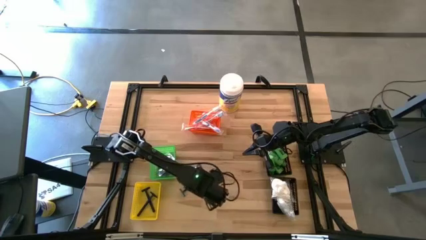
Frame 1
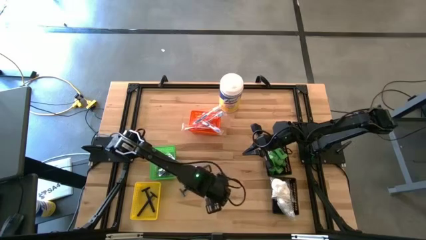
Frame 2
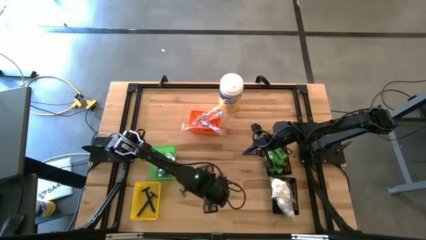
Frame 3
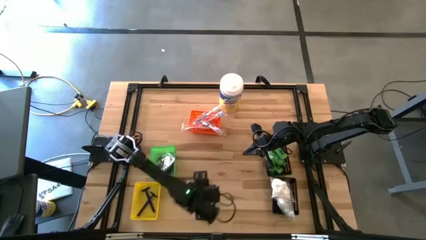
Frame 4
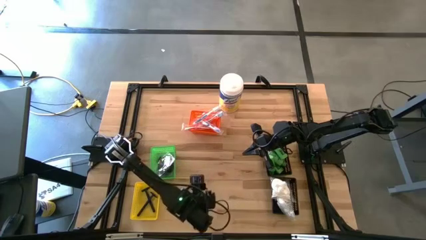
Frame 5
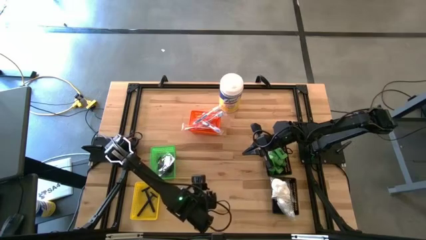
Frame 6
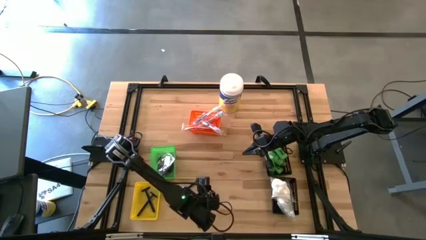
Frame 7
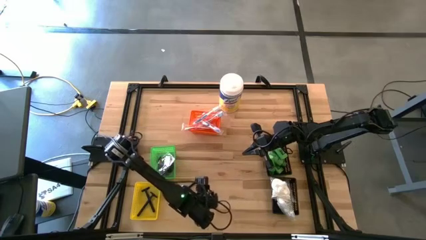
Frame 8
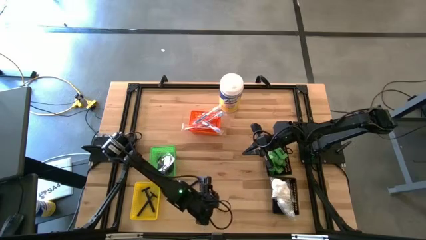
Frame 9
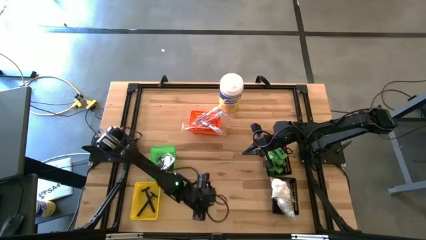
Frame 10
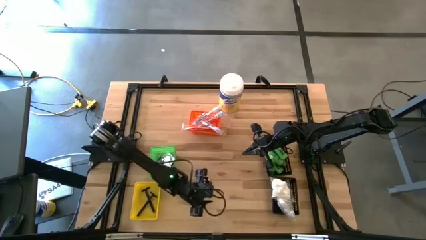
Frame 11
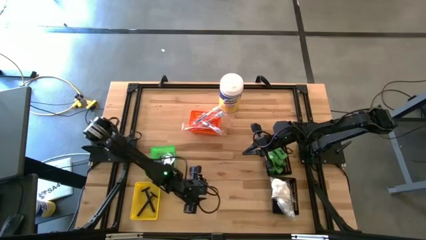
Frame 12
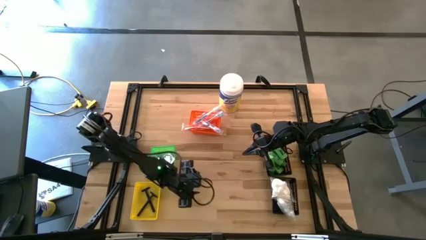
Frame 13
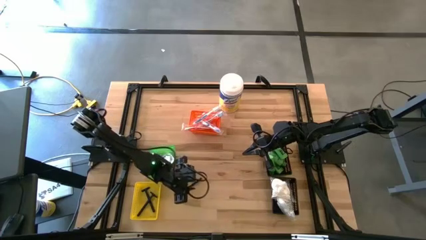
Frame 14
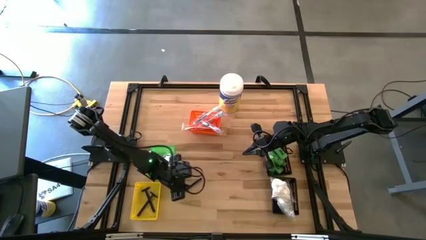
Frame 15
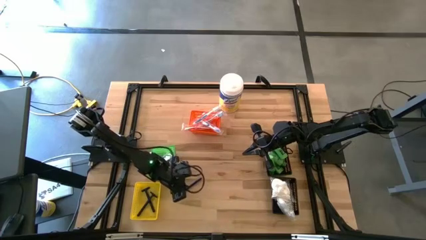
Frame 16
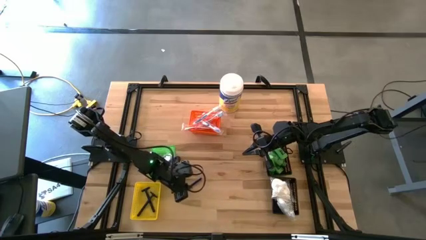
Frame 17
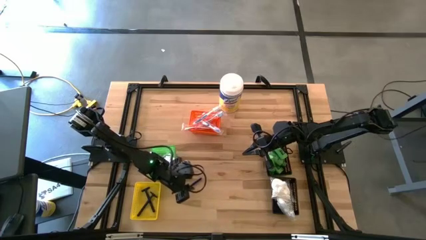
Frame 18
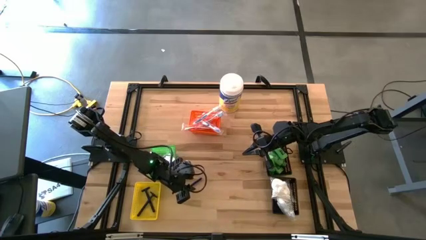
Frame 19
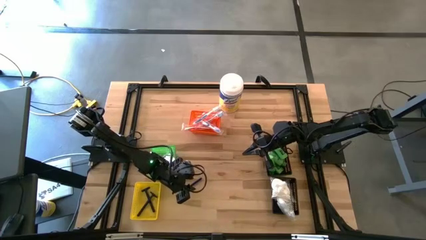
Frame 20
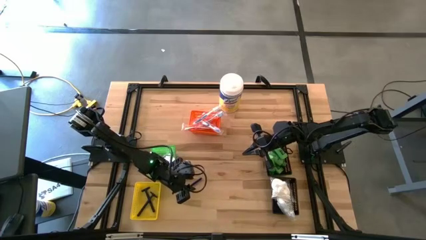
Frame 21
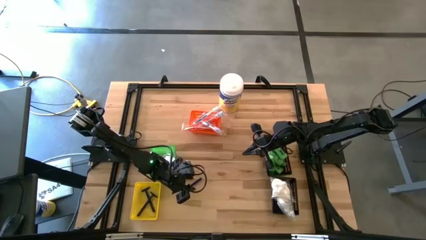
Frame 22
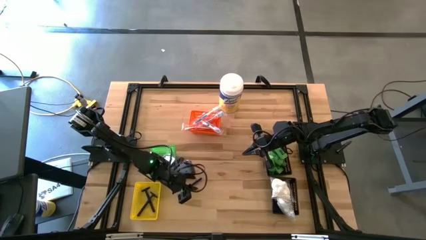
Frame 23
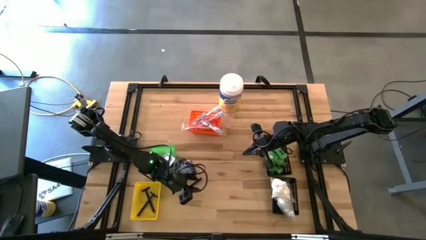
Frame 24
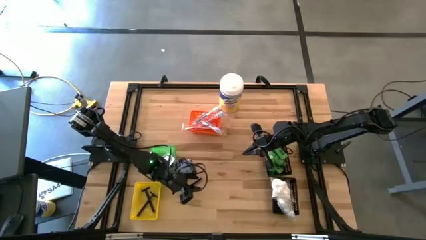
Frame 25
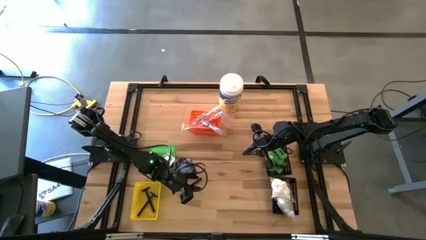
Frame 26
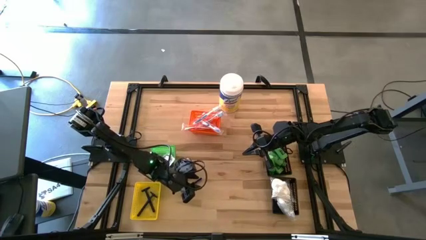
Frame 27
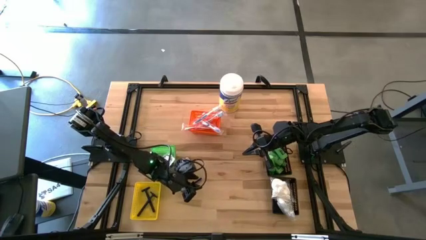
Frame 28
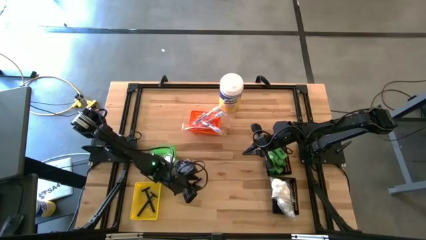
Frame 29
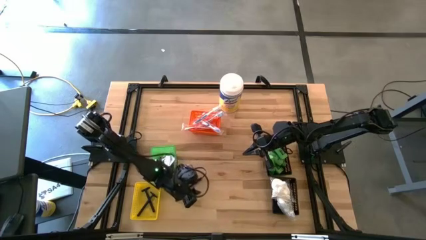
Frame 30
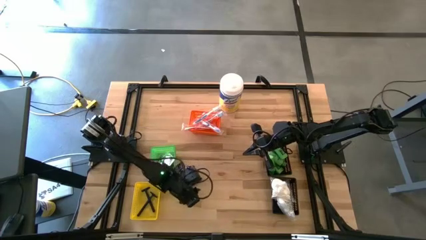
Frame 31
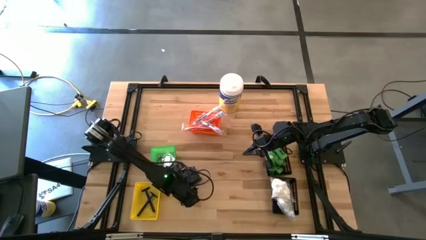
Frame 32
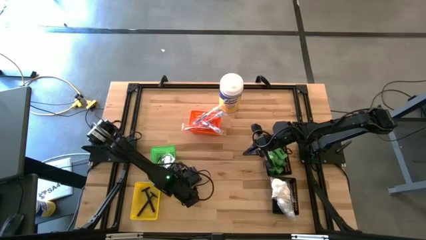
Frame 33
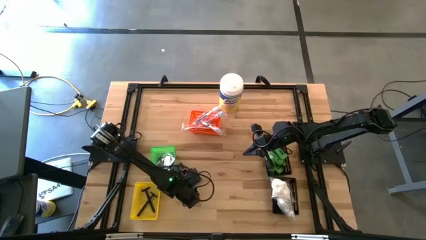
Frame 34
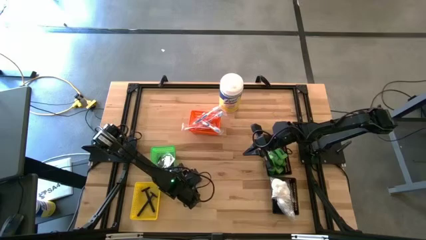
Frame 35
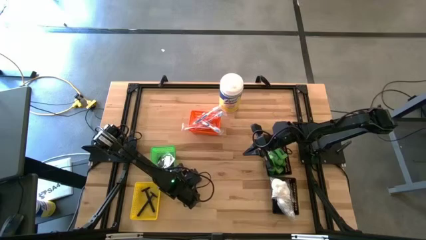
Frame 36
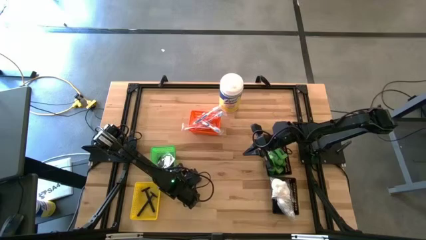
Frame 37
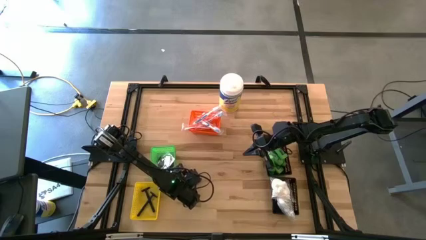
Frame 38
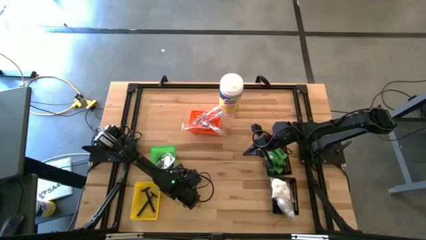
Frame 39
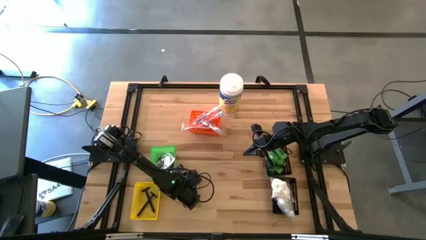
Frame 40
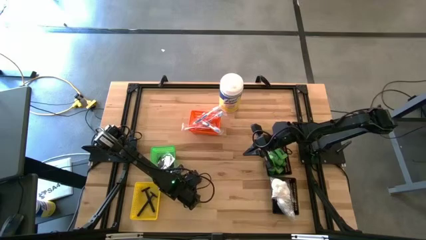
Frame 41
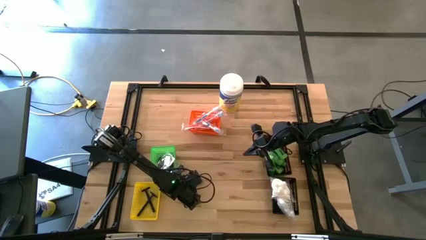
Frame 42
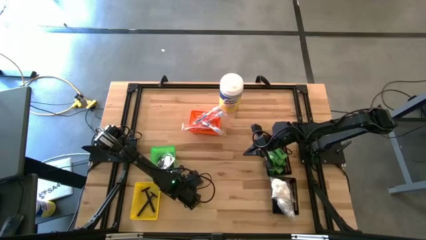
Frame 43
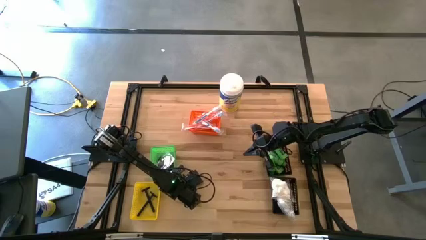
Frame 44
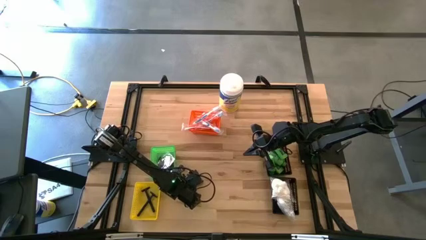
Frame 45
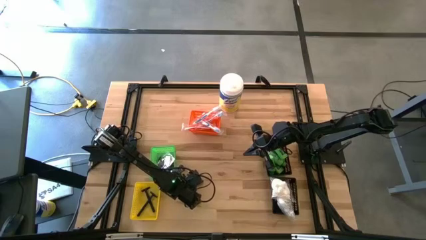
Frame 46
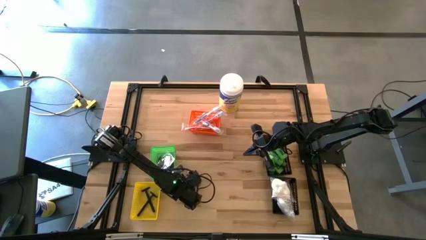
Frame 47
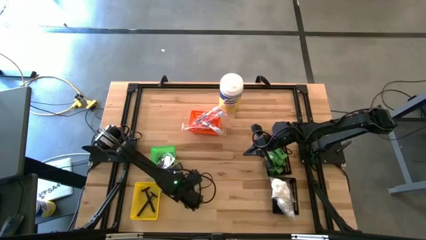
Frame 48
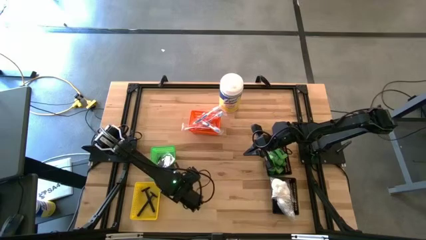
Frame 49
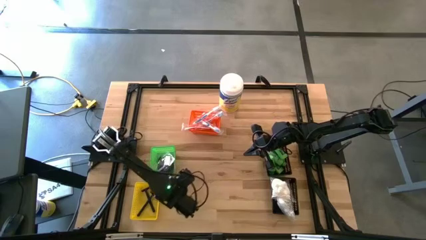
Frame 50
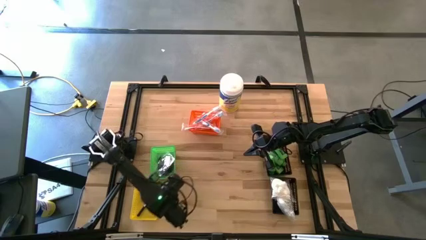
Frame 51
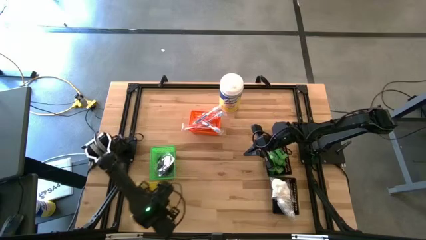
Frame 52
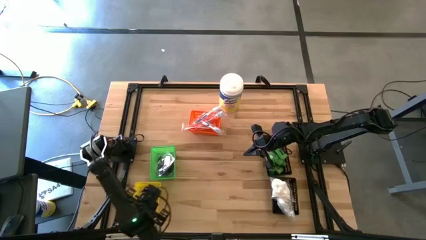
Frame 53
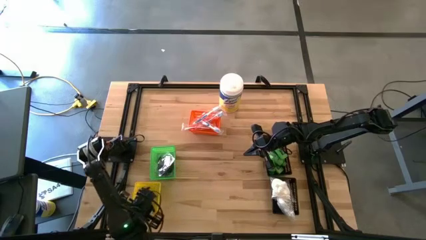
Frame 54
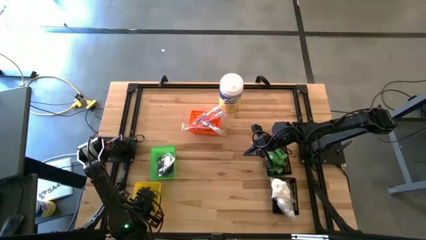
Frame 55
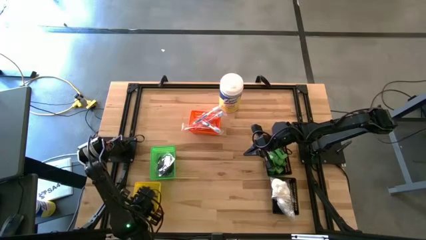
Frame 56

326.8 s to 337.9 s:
Task: Pick & Place Travel size toiletries
Put the blue razor into the yellow bin

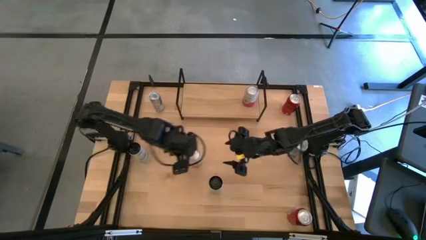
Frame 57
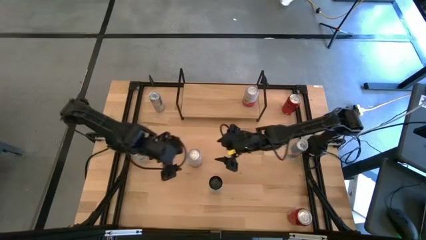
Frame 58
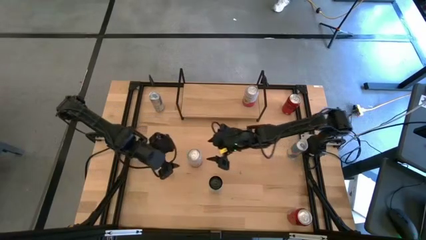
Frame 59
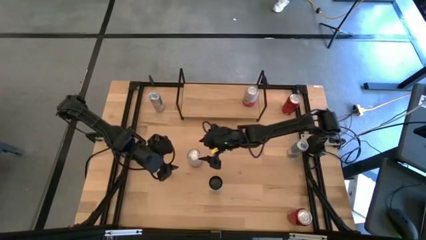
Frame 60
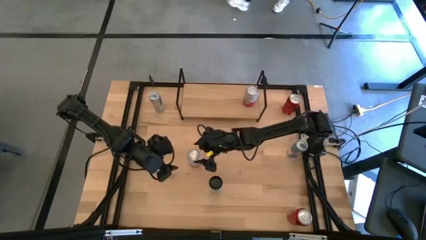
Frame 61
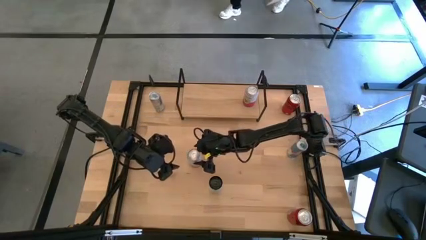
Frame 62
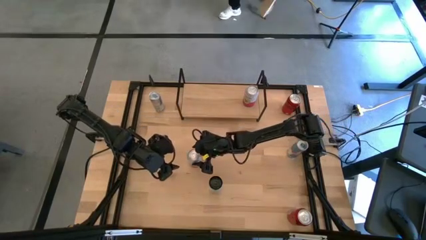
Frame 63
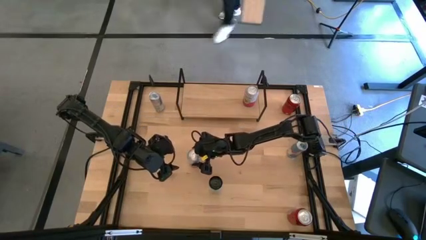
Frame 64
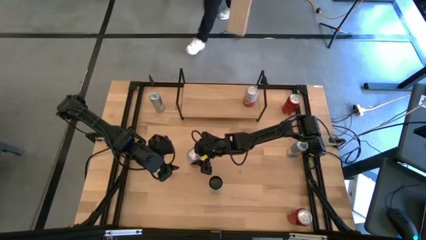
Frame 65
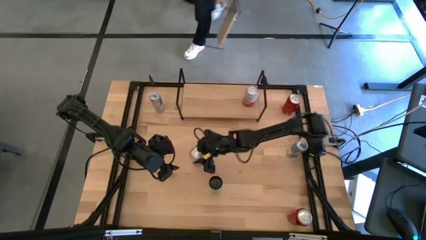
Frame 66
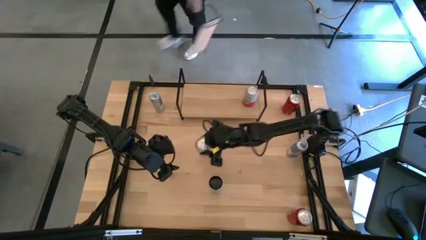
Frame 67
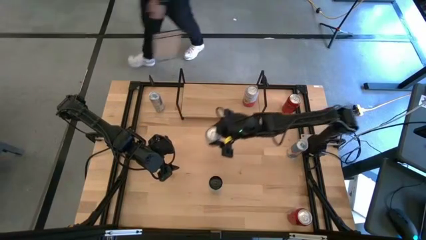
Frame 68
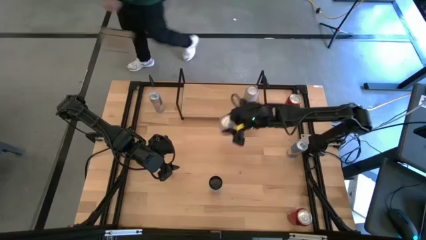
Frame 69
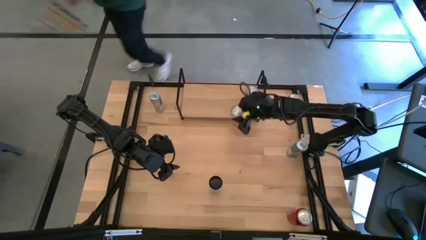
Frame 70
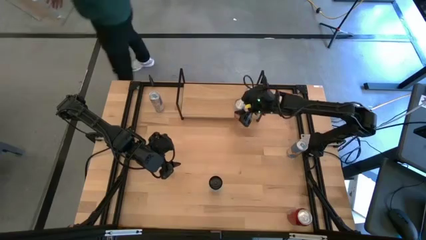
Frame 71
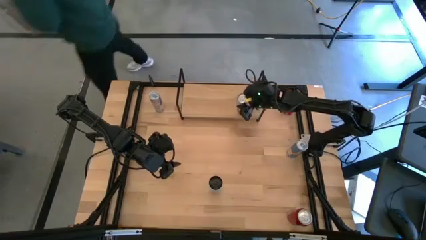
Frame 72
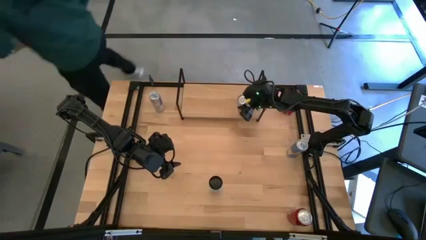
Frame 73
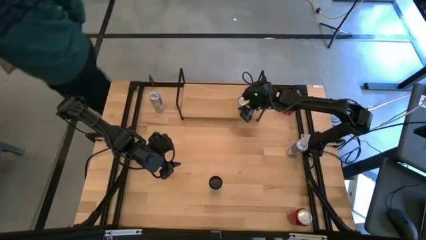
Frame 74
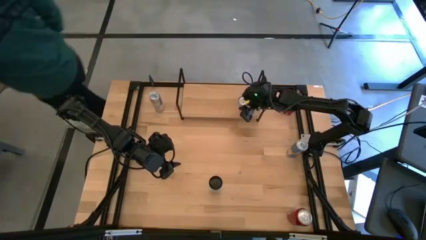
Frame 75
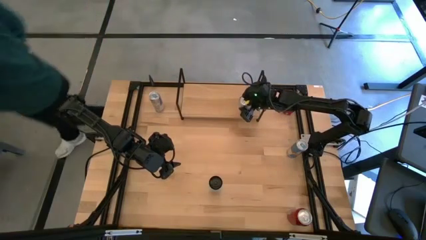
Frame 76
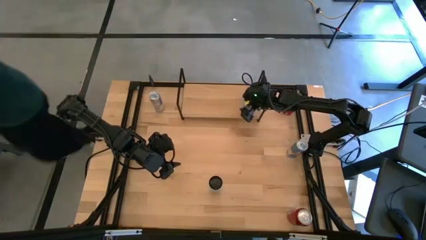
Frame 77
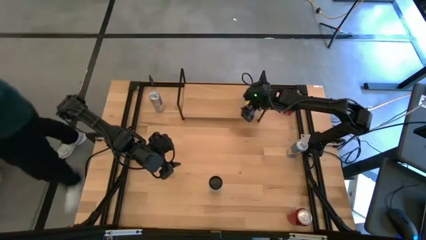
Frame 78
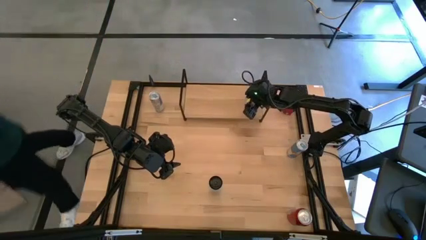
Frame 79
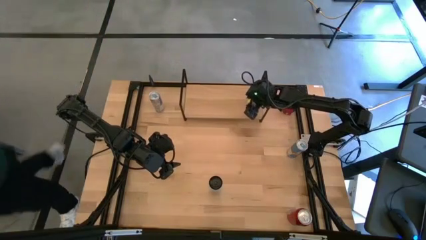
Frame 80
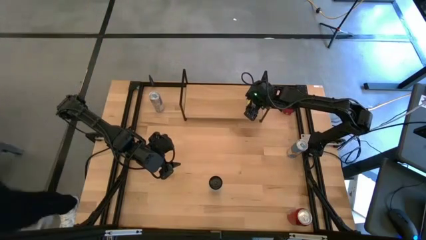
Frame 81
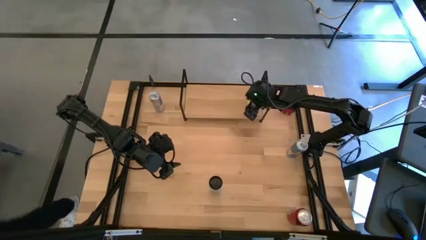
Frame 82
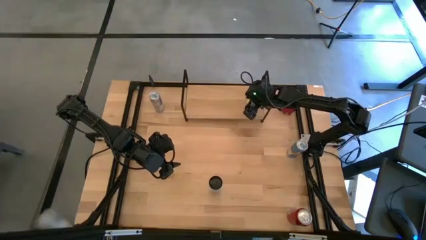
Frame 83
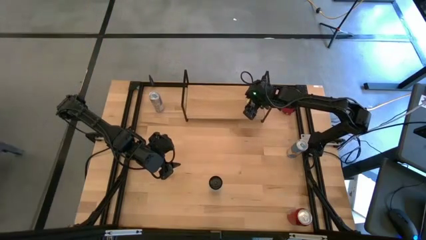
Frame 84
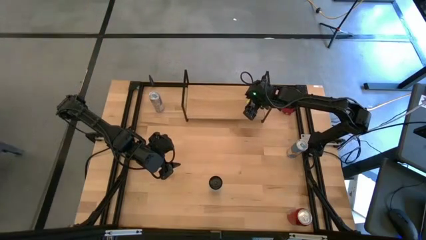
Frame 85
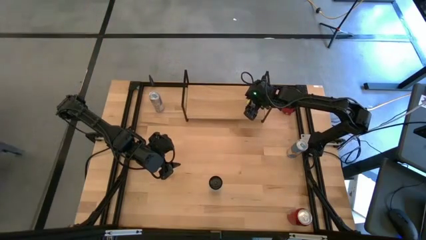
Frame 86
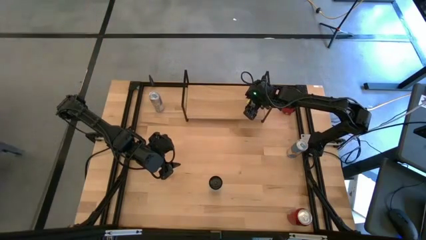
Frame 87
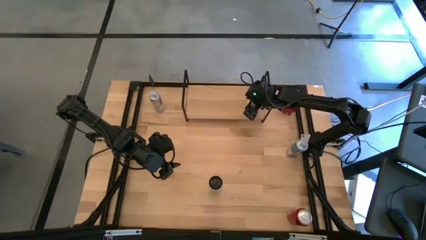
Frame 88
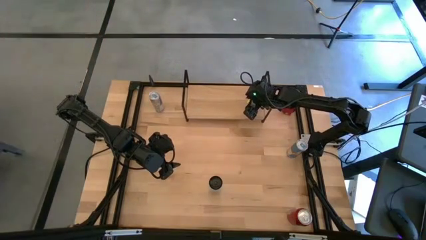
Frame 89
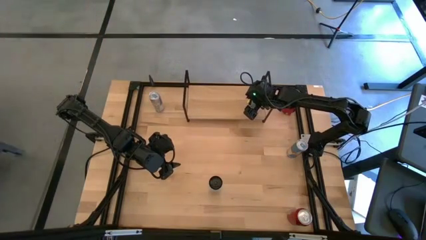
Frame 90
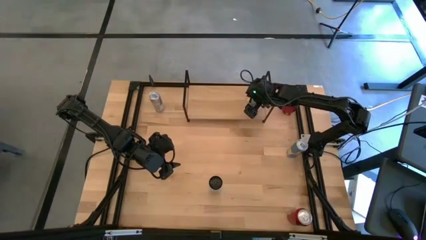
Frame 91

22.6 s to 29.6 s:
Task: Place canned beverage on shelf
Align the pink soda can with the other pink soda can on the shelf
